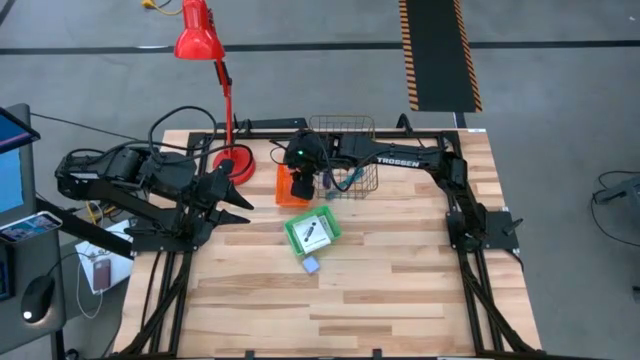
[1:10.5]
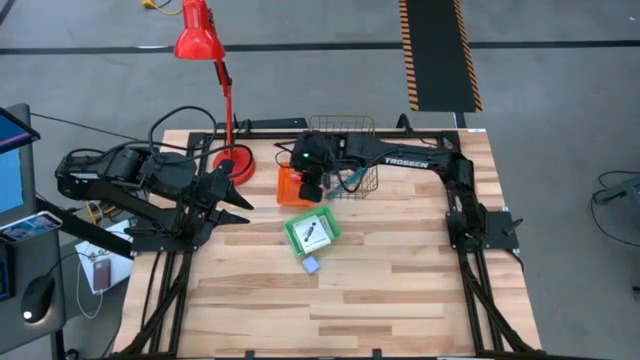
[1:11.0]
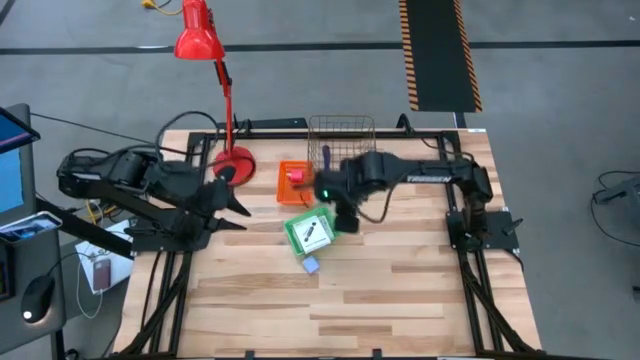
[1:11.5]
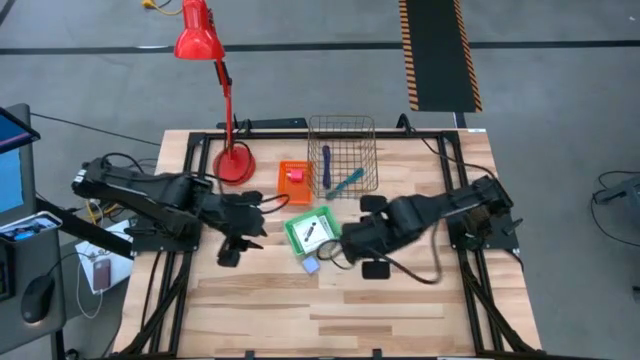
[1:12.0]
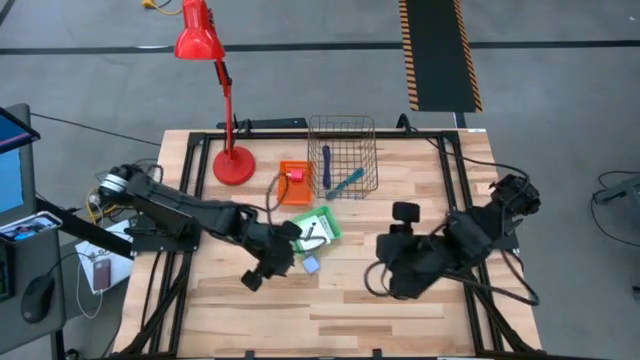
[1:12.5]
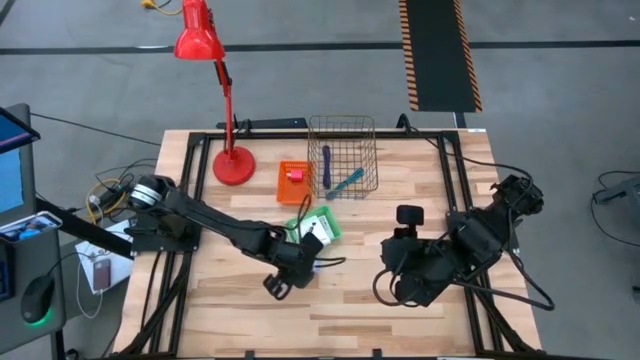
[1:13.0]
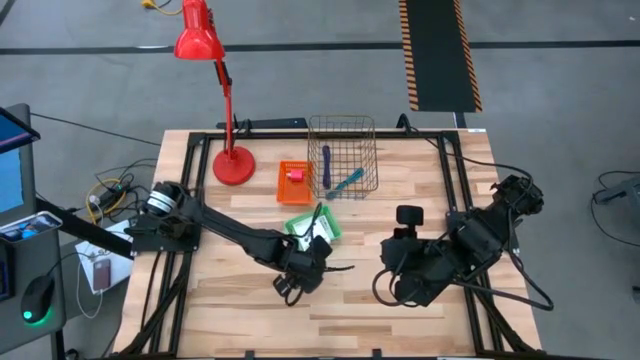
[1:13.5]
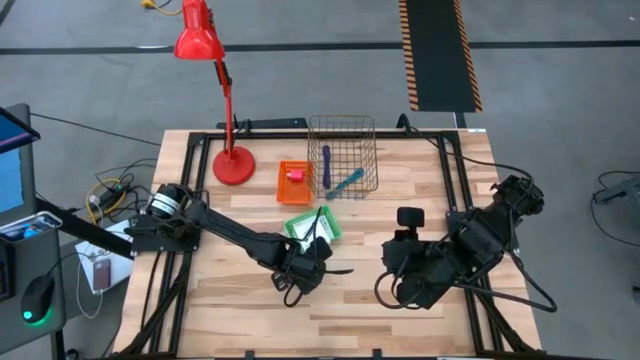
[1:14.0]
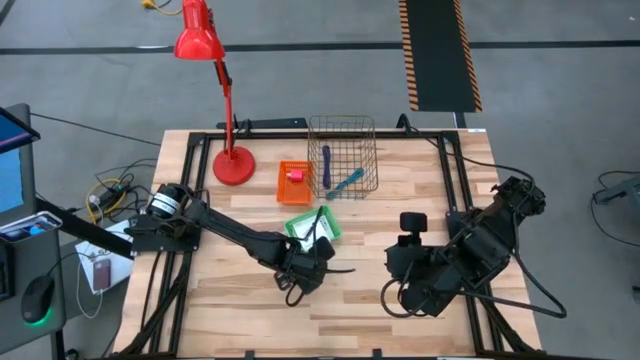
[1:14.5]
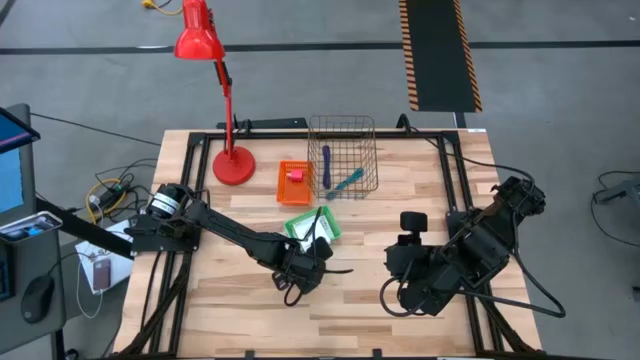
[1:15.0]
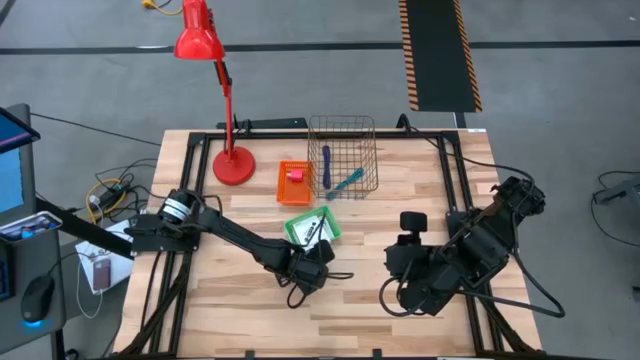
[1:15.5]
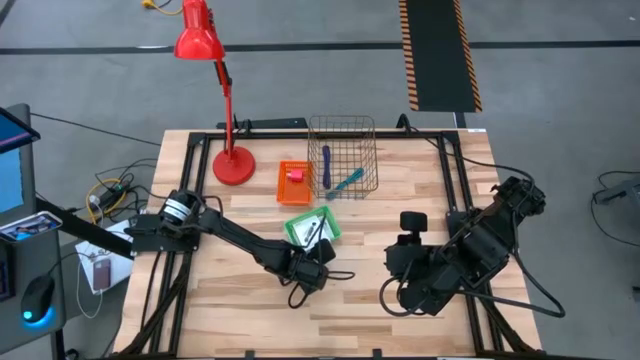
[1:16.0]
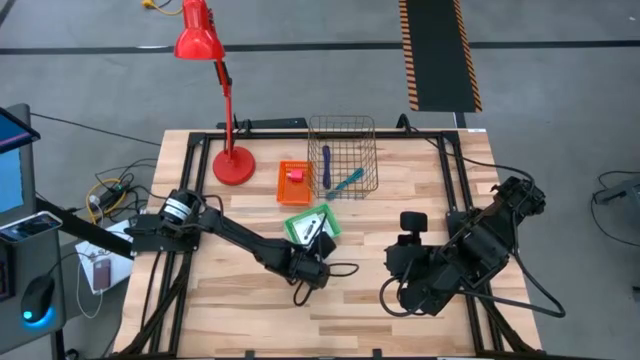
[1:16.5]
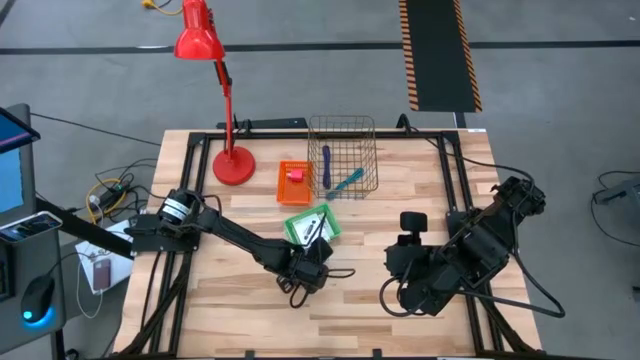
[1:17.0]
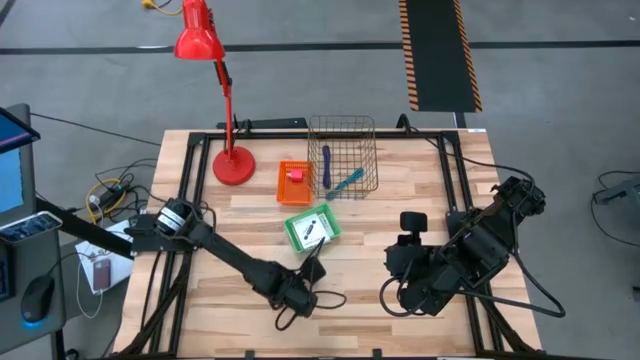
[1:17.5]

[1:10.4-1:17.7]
Task: Pick and place items into bin
Move the white adaptor to the center

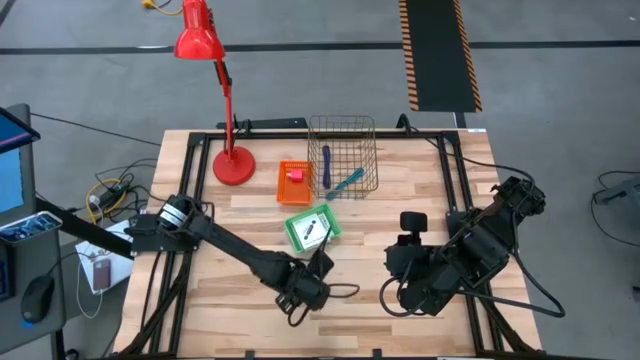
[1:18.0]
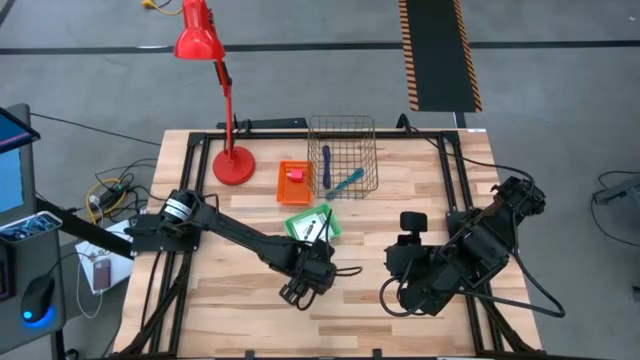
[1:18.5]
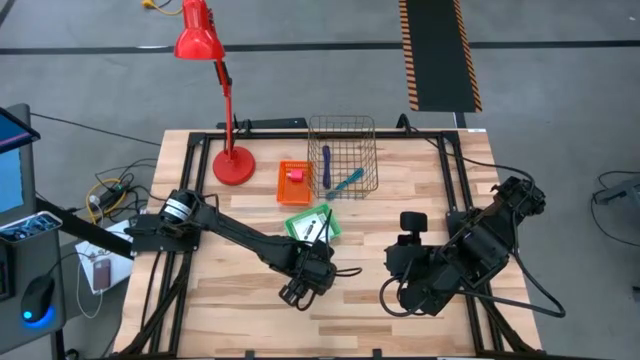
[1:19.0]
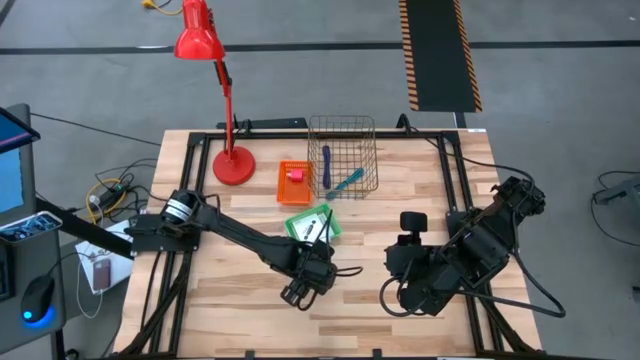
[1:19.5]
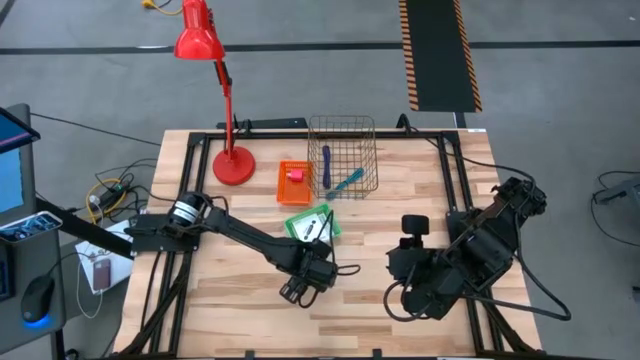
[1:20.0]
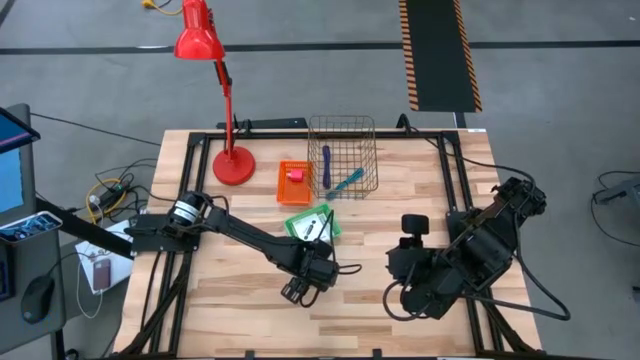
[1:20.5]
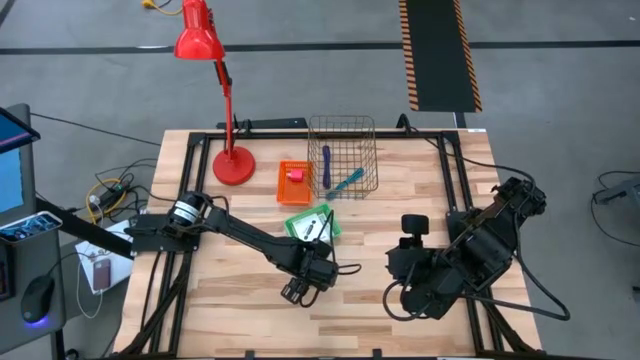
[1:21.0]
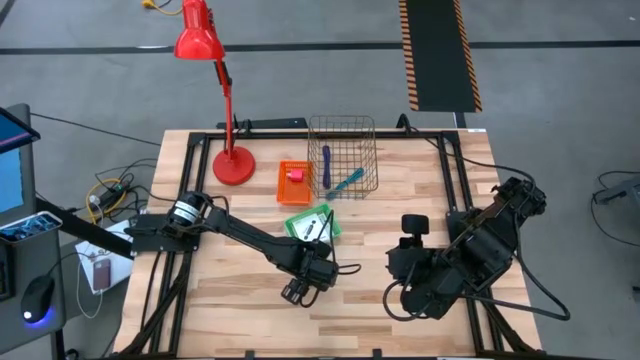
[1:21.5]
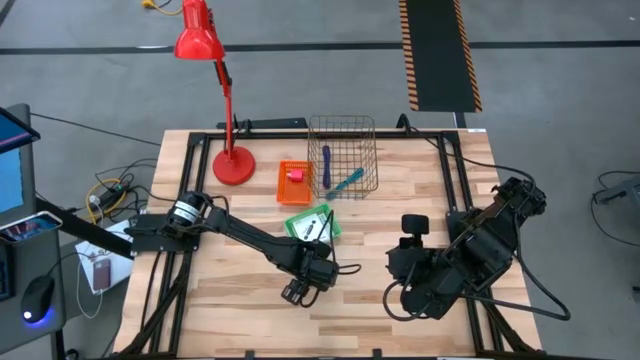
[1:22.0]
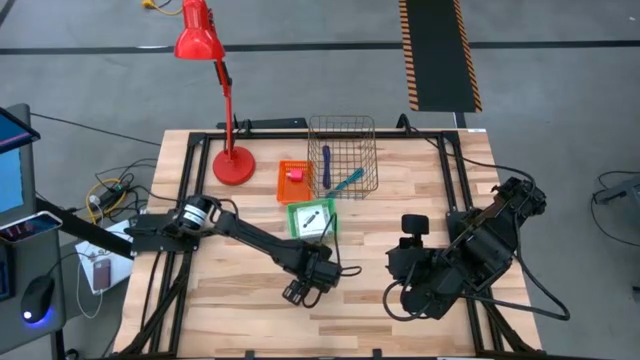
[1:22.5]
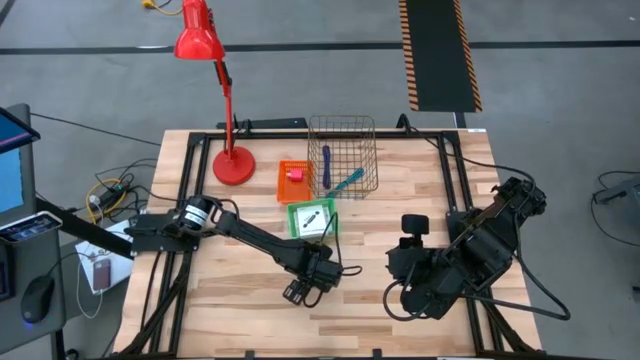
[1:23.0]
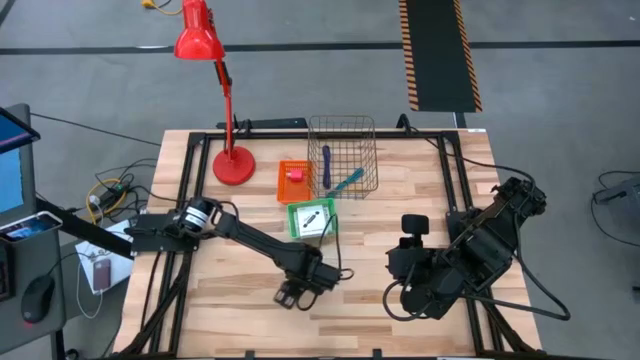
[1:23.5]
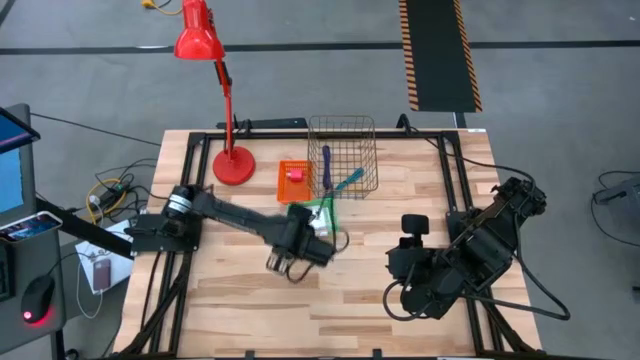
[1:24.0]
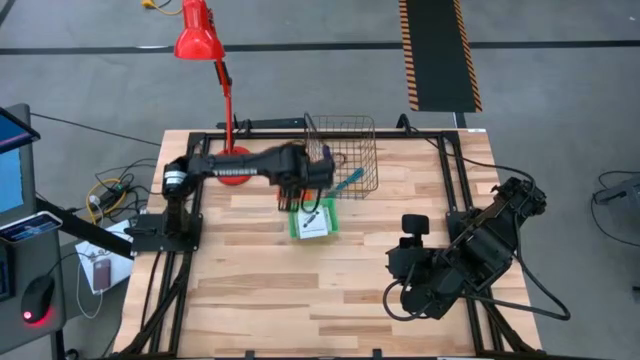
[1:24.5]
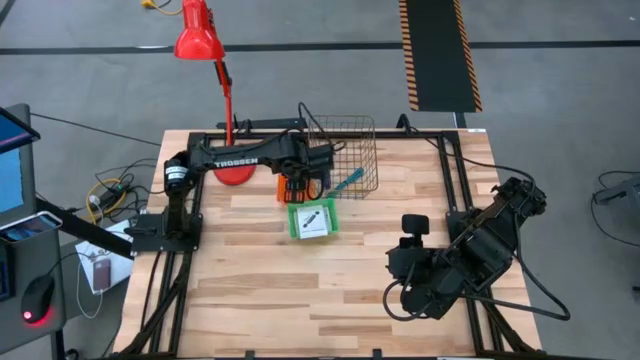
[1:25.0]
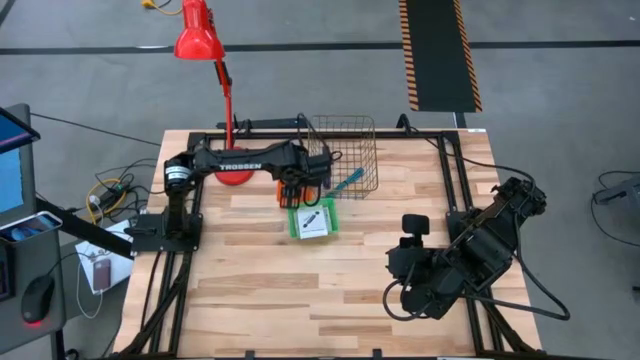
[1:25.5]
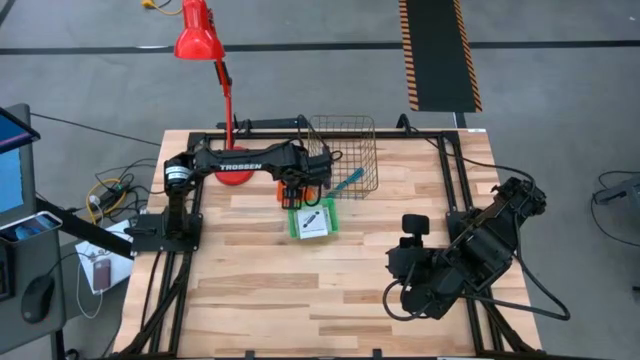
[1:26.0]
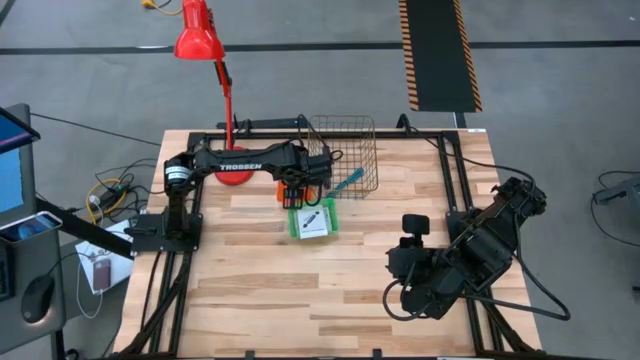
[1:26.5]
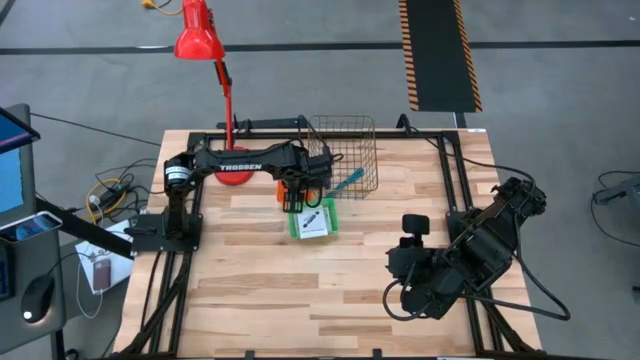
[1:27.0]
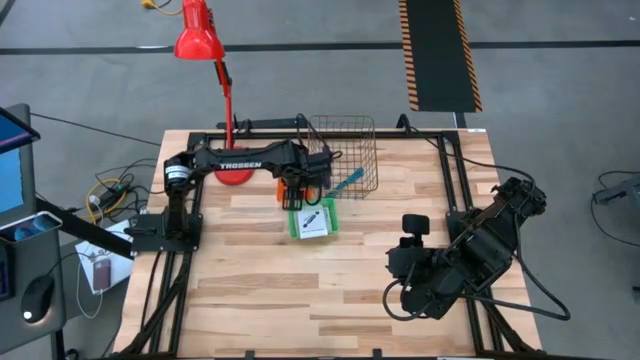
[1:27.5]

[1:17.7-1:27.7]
Put the white adaptor into the orange bin

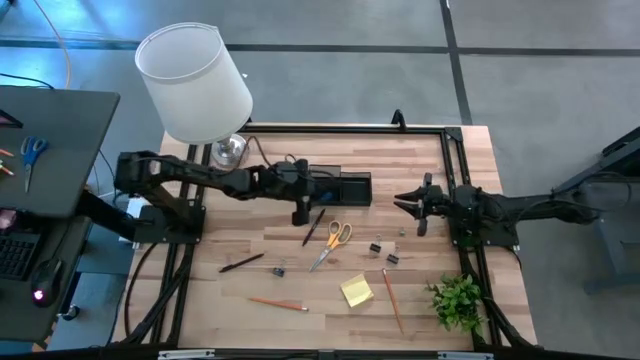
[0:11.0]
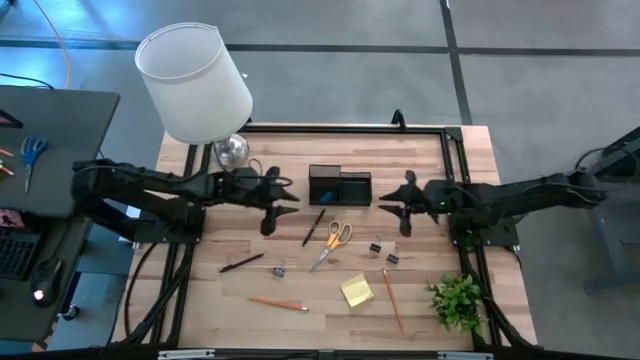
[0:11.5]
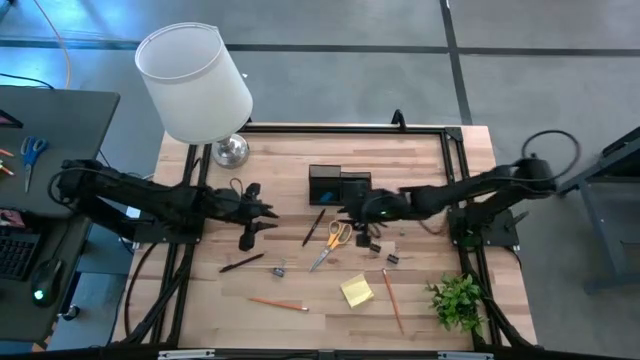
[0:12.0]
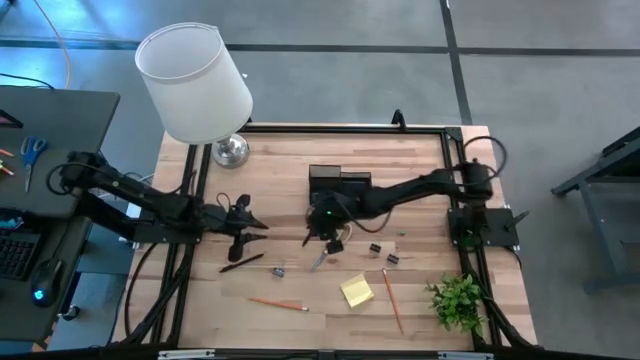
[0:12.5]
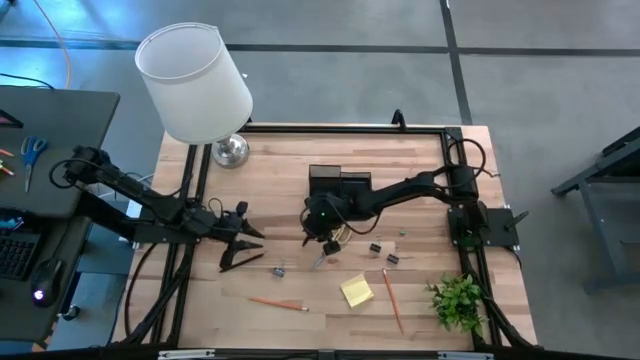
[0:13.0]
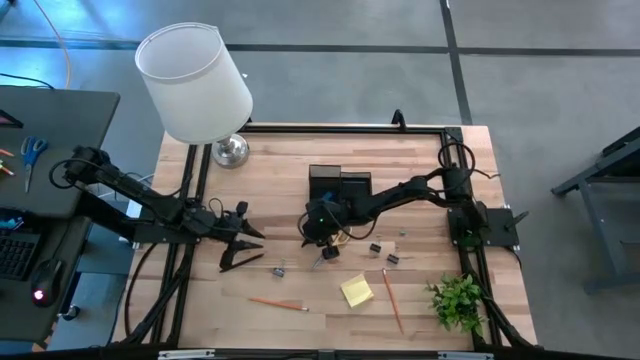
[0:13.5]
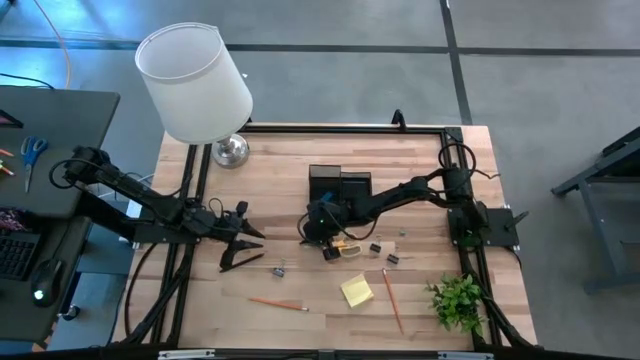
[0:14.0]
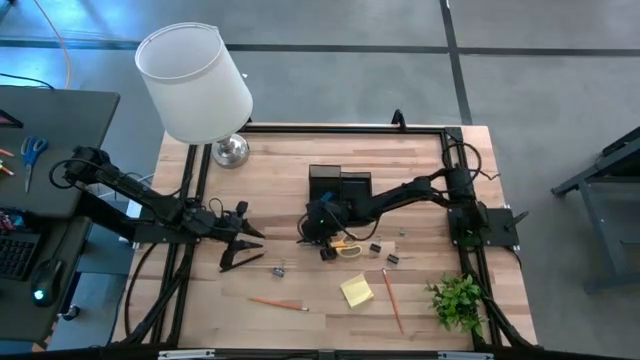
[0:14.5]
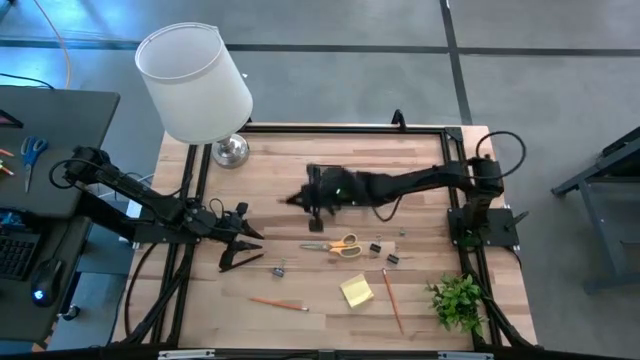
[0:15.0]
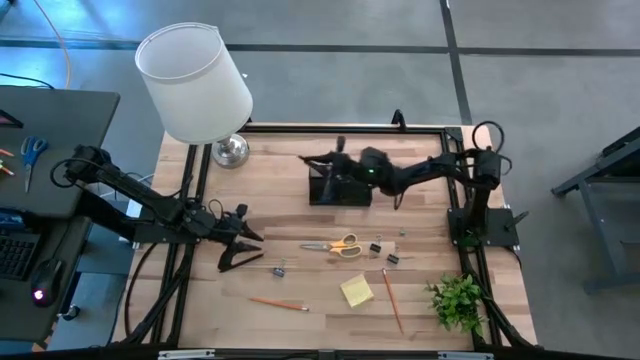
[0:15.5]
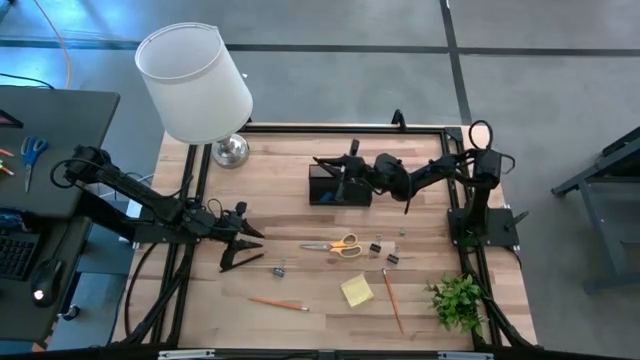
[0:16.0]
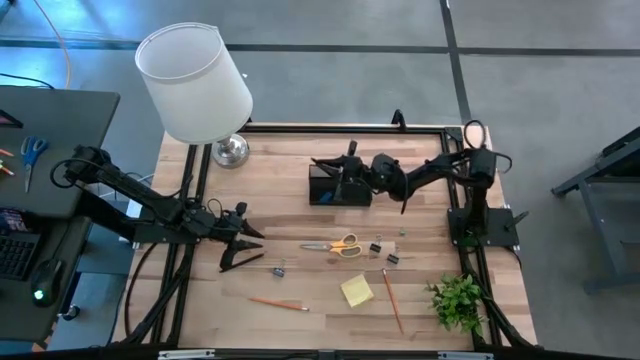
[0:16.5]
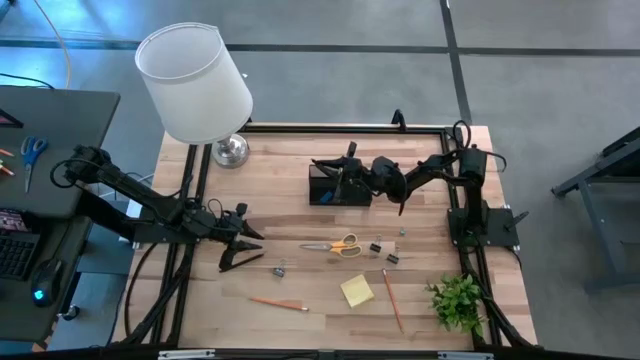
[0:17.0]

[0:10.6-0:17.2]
Task: Pick and place office supplies into organizer
Put the top black pen into the black desk organizer
